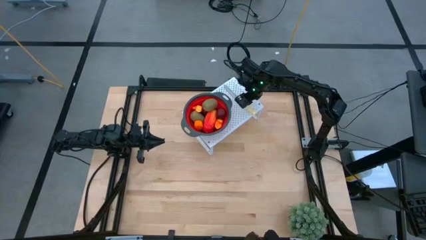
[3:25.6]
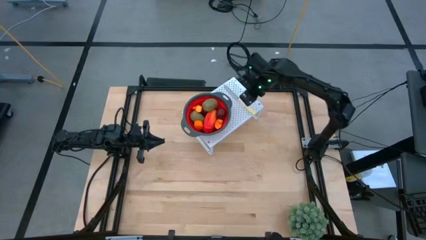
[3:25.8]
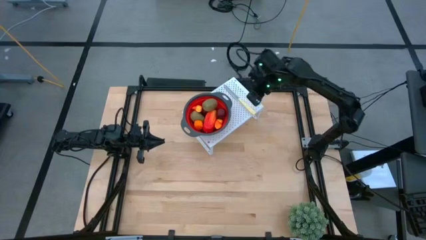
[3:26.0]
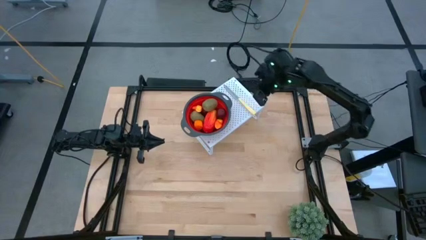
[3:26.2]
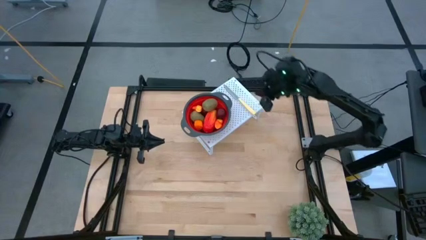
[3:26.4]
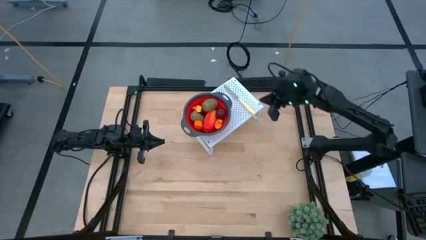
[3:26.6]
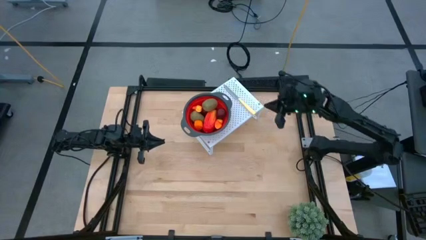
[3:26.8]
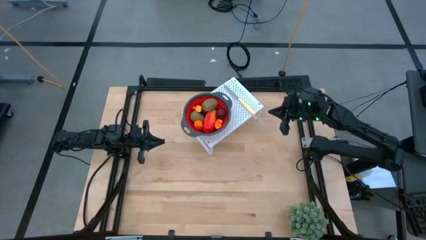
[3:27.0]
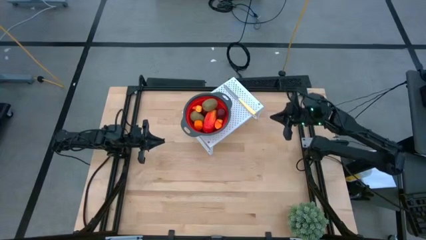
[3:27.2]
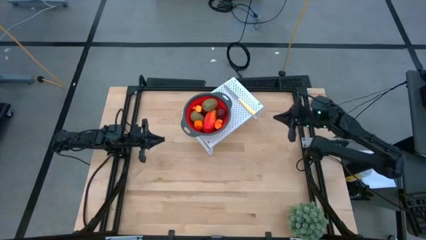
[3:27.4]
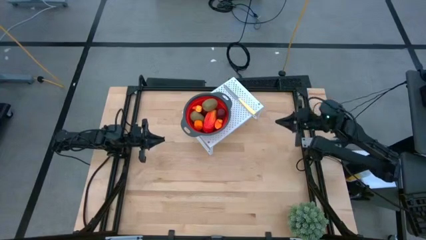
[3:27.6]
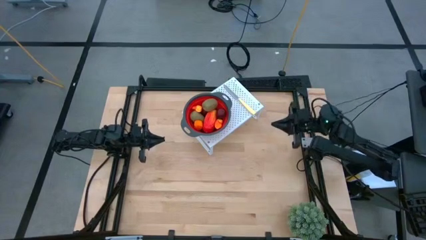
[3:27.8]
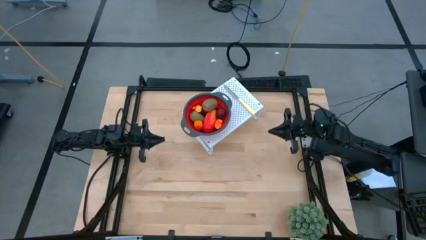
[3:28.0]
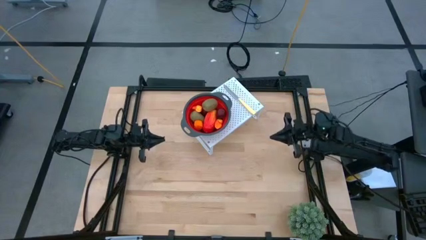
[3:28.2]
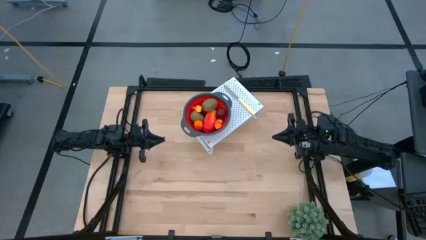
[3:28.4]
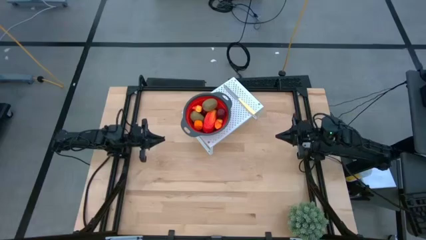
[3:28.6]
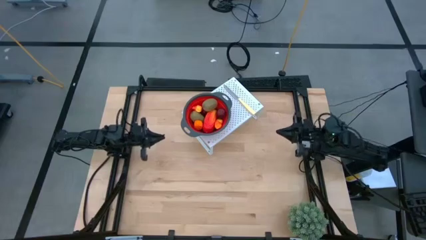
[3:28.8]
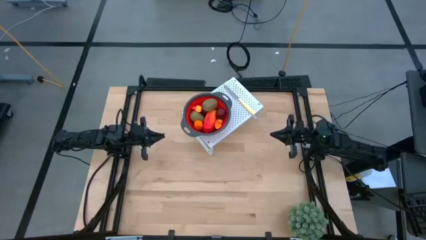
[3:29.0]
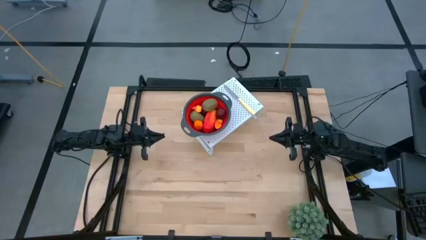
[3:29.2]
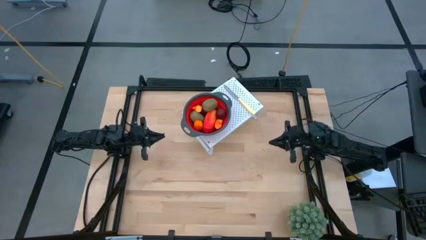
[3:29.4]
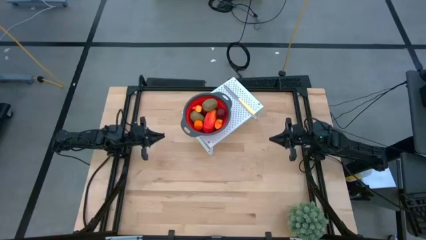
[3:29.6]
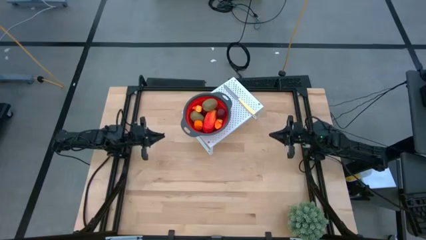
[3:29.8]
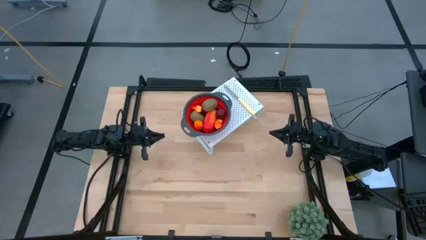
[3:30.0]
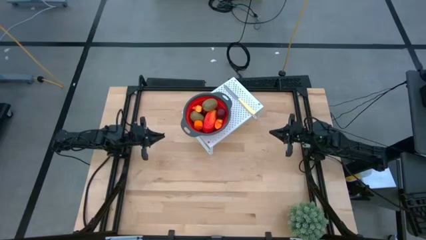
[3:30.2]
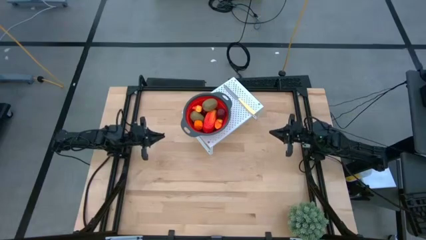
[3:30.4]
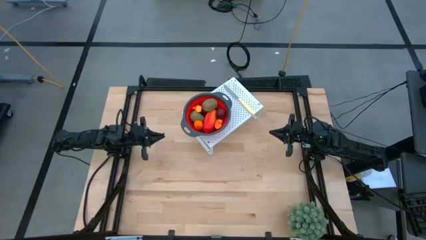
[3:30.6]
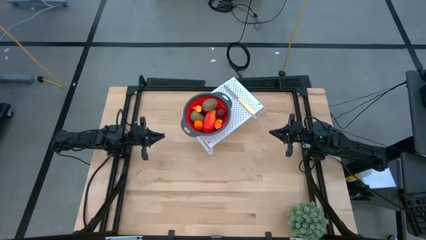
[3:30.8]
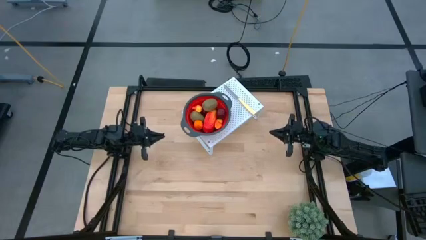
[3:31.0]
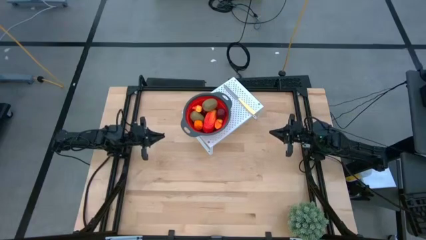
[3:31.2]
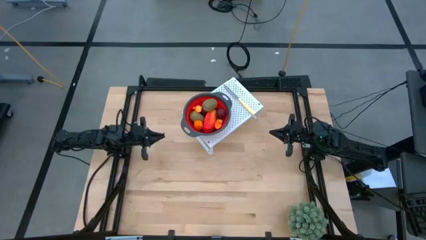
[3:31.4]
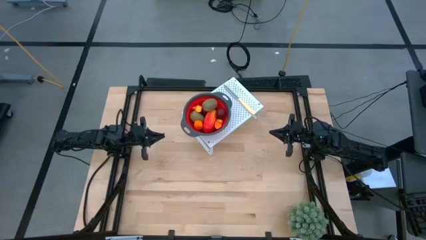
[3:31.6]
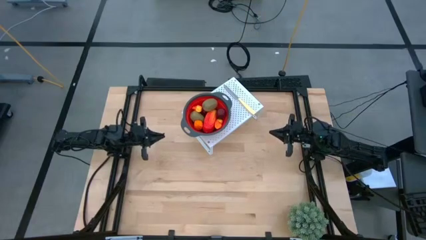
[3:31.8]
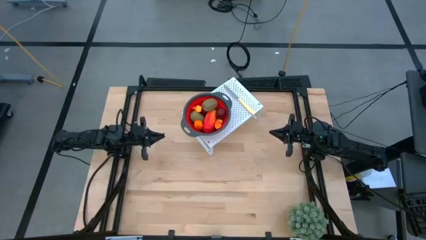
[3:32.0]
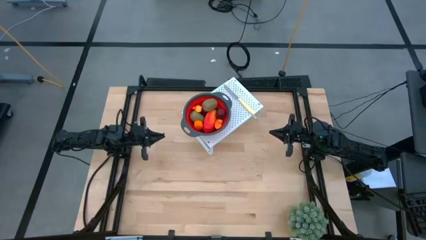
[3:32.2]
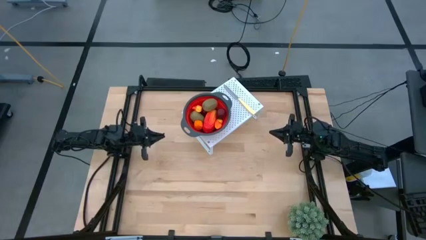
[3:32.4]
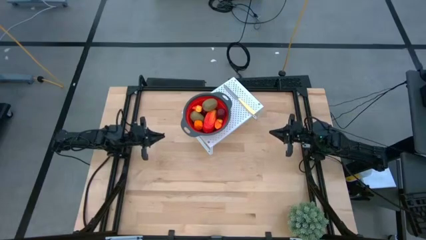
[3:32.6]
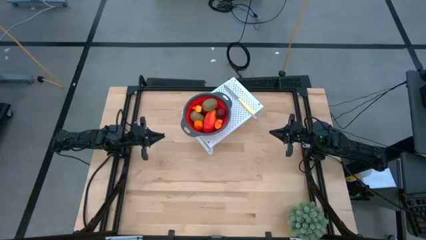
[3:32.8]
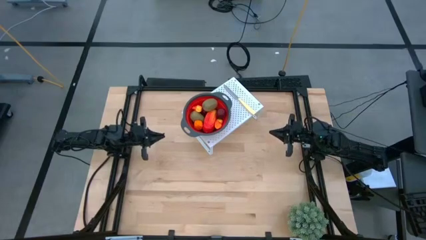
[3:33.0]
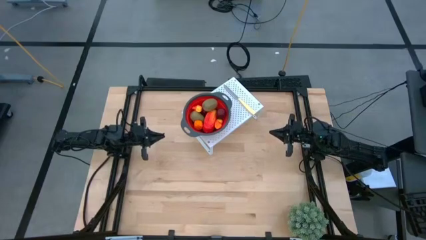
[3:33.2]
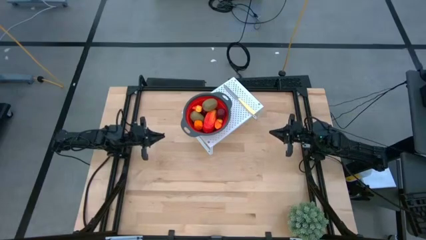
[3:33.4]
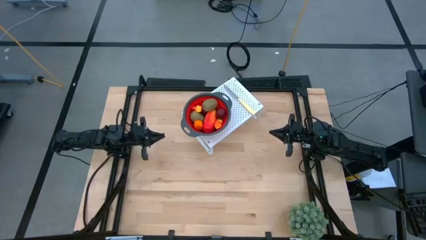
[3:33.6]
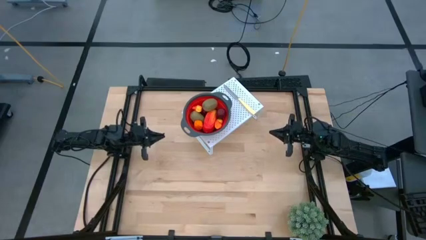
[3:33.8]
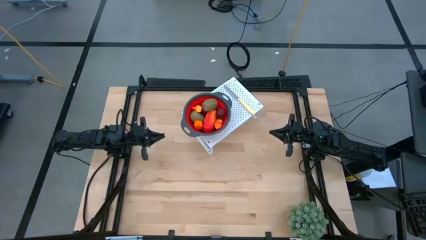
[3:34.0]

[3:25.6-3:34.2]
Task: Pick & Place Fruit
Return to Home Position

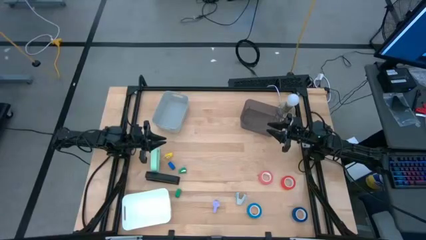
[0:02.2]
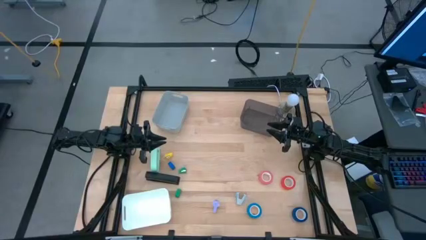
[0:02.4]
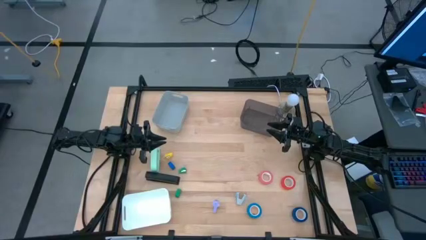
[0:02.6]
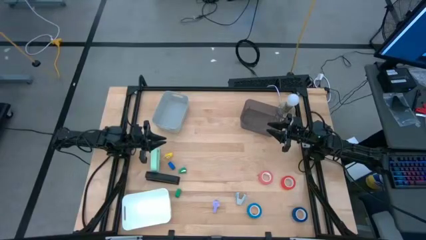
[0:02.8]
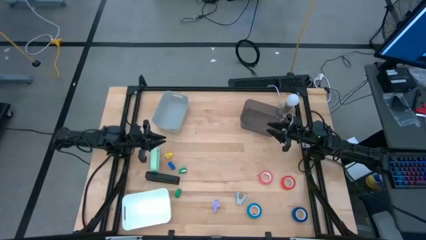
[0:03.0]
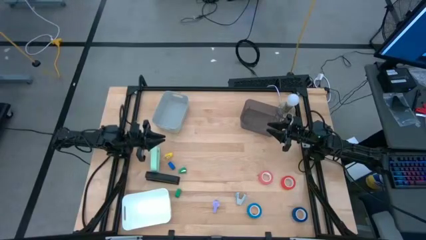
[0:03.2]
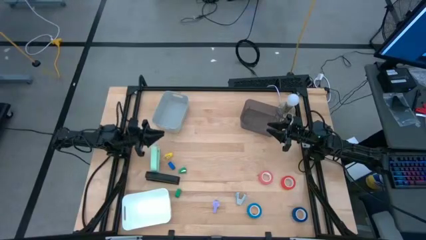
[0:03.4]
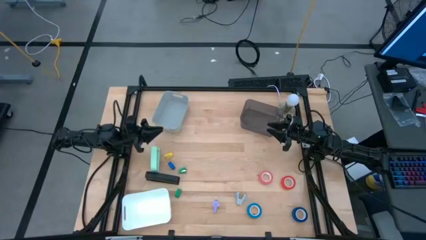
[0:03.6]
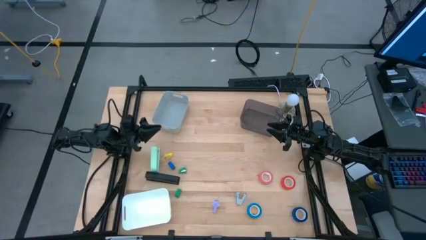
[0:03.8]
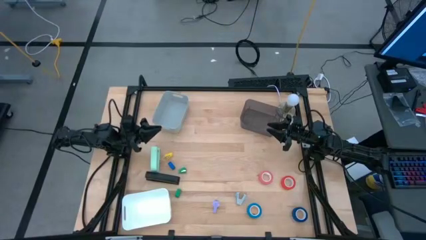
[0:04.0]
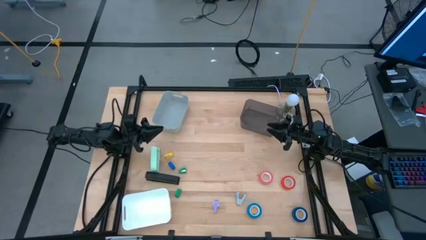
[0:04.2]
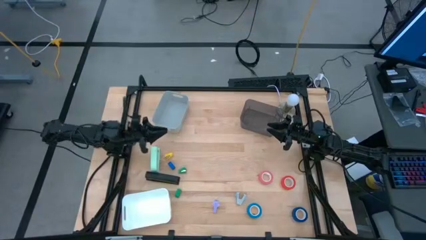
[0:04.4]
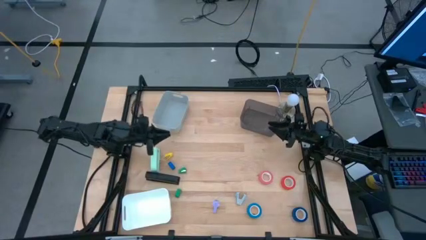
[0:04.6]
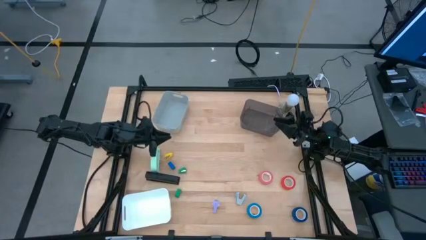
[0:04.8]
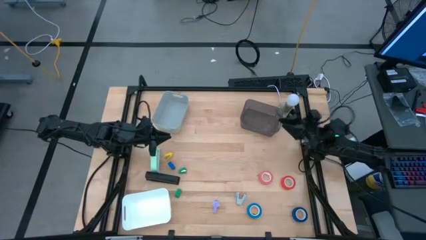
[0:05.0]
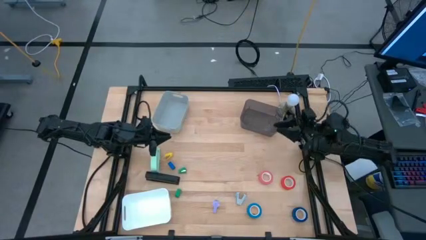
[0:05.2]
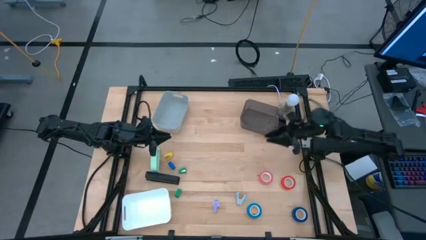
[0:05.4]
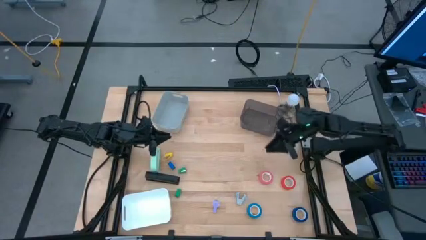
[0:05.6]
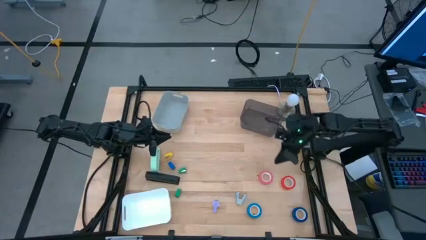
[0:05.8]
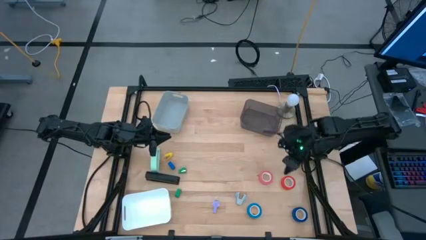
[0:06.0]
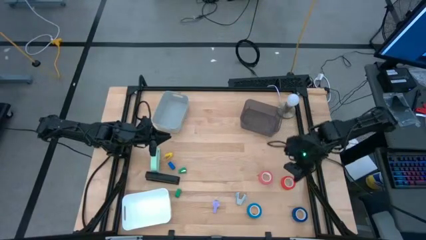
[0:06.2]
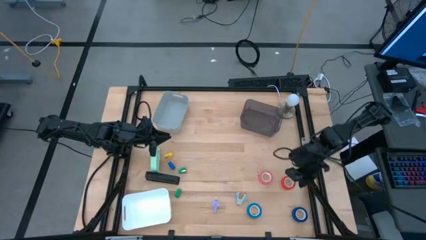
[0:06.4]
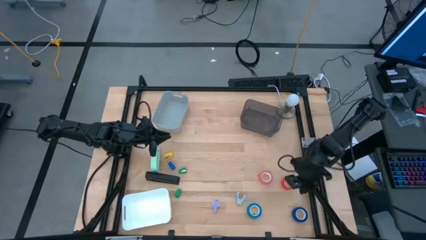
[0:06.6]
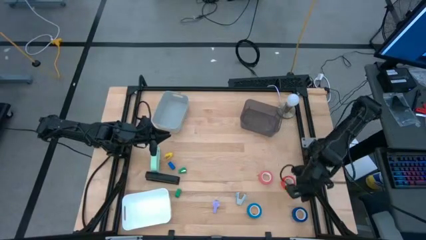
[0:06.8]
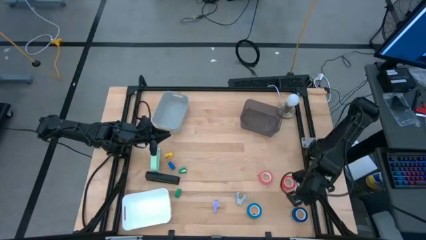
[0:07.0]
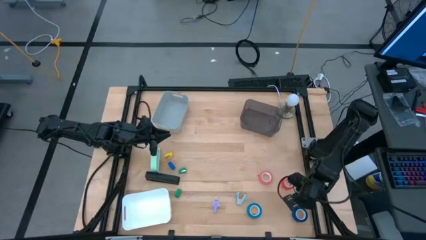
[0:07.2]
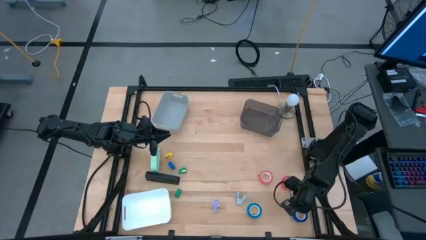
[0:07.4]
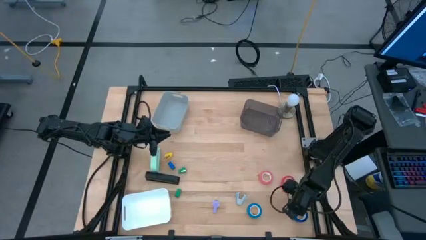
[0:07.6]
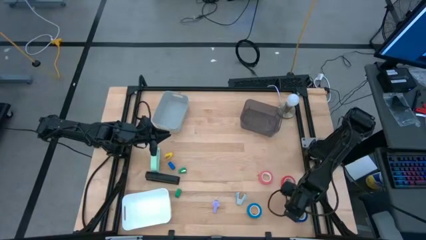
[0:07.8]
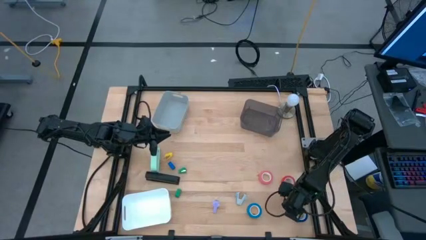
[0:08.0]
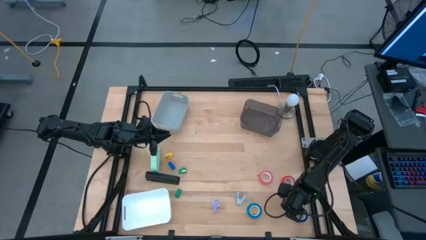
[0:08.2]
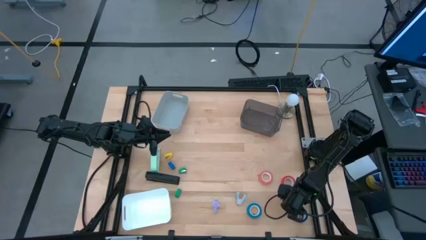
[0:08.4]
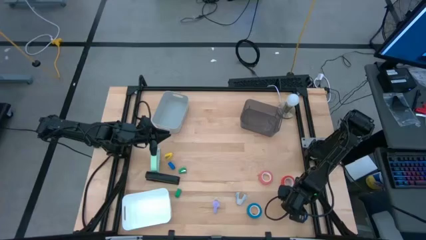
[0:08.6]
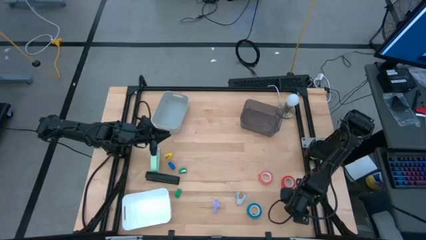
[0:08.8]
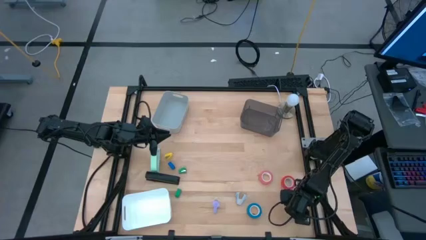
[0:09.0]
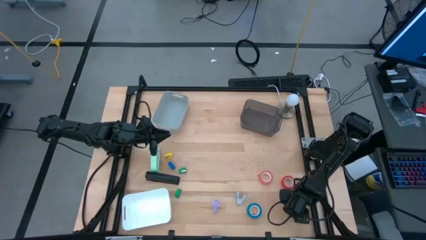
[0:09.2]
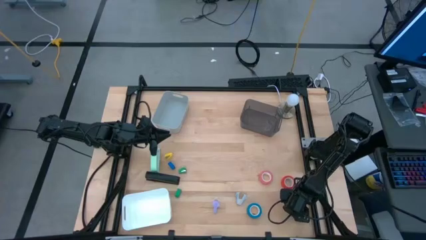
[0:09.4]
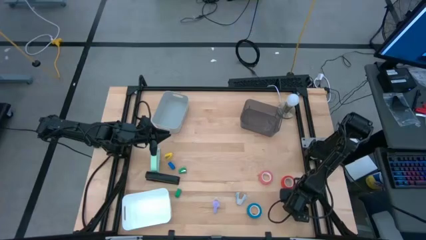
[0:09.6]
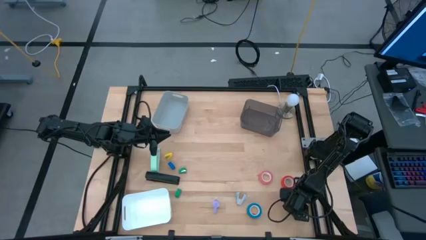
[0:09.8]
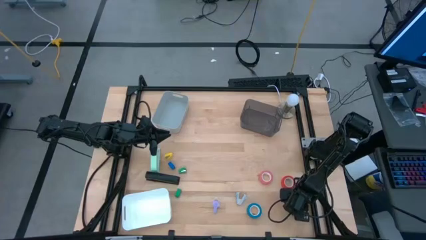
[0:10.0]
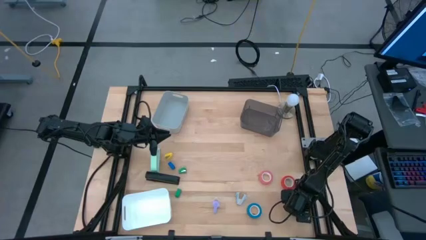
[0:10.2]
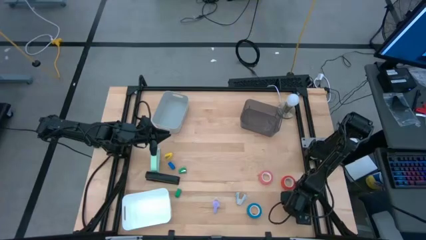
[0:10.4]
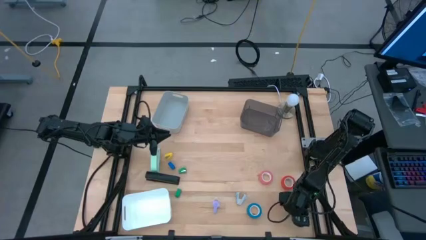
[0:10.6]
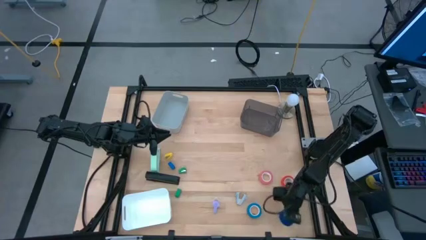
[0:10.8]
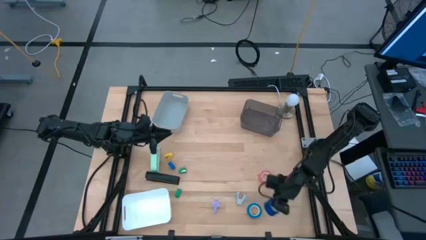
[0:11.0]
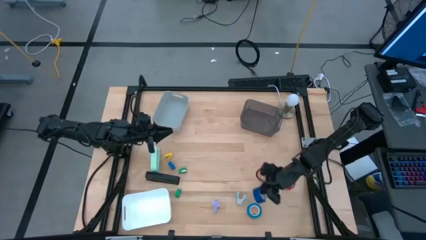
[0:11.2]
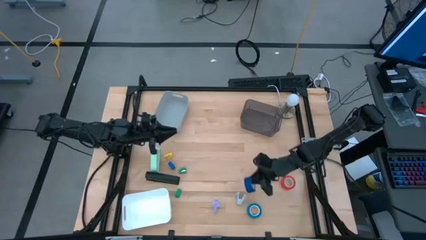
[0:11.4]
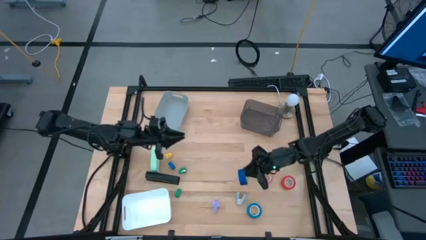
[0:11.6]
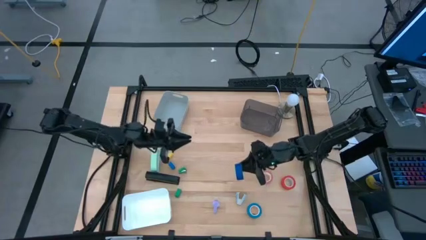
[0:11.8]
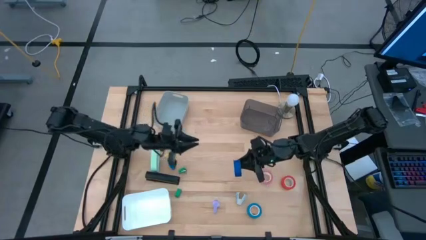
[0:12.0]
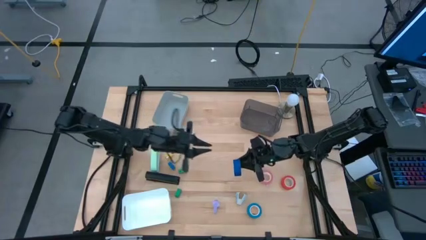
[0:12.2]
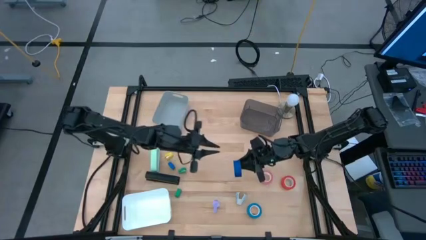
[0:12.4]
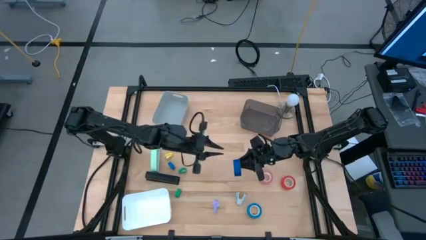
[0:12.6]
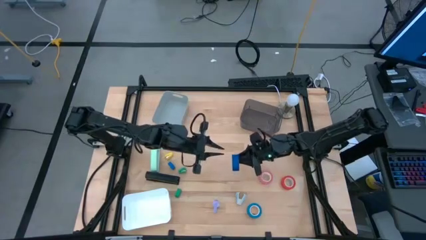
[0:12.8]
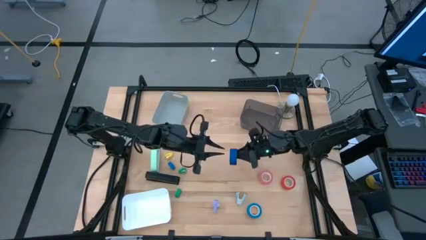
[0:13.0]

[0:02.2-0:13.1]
Task: Pick and place Stapler, Stapler remover, tape
Put the blue tape into the gray bin
